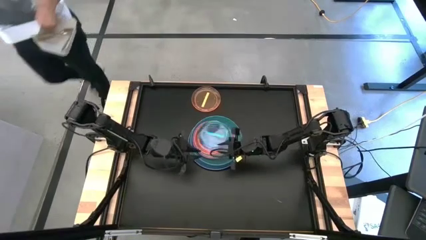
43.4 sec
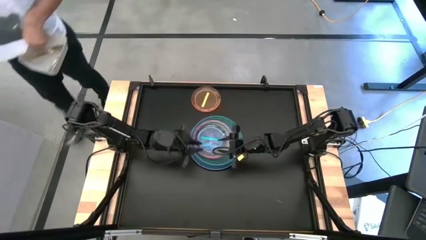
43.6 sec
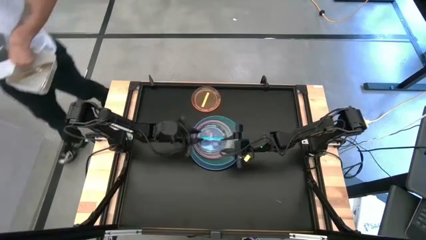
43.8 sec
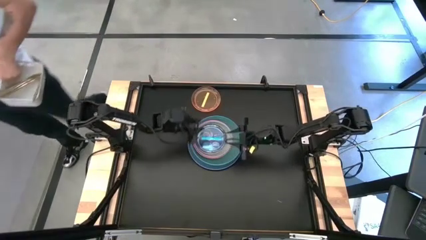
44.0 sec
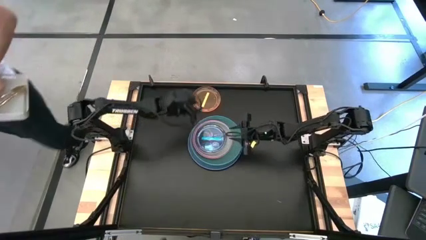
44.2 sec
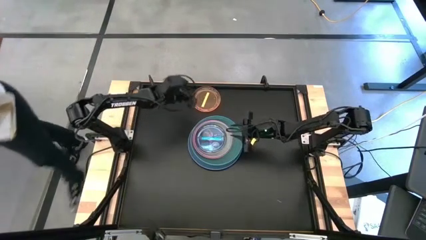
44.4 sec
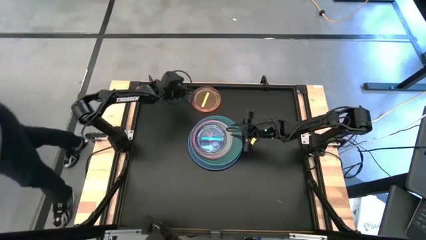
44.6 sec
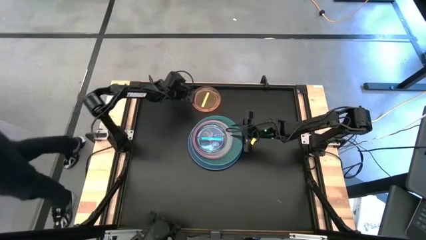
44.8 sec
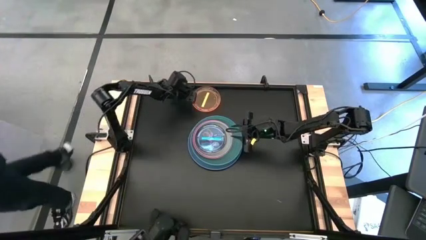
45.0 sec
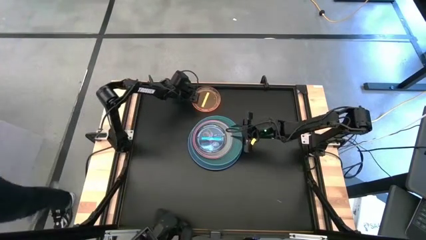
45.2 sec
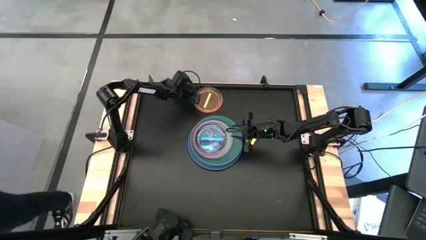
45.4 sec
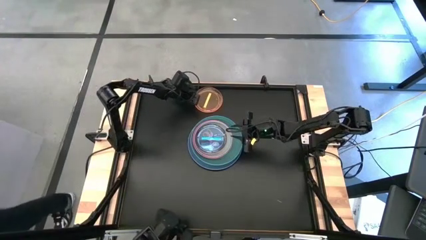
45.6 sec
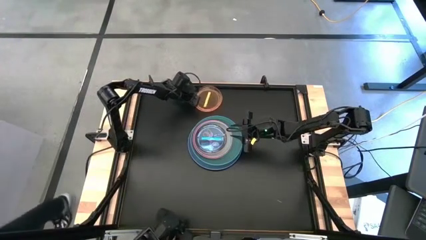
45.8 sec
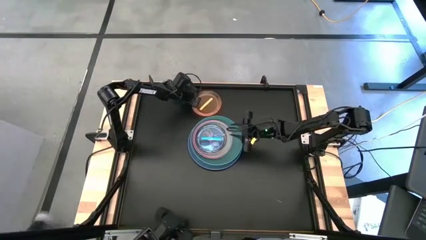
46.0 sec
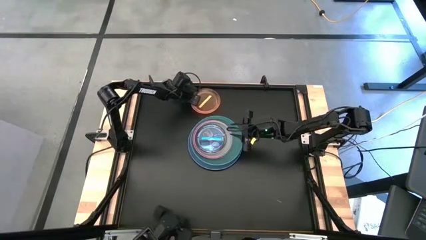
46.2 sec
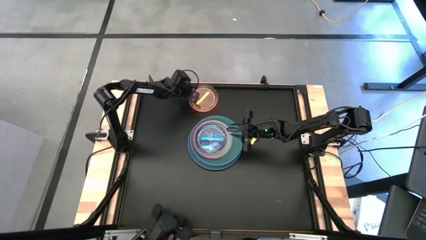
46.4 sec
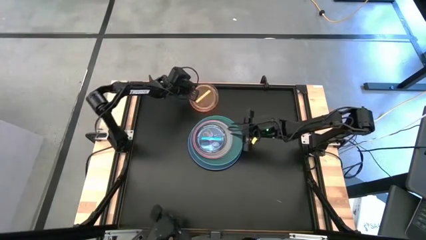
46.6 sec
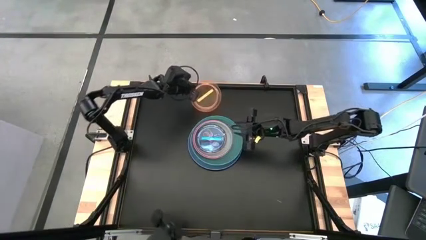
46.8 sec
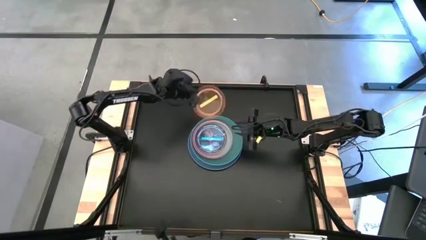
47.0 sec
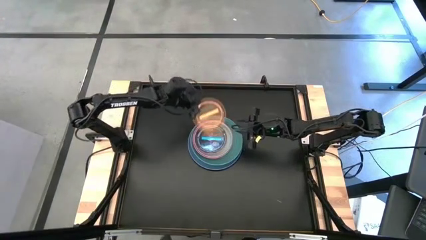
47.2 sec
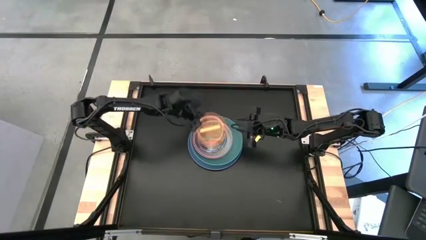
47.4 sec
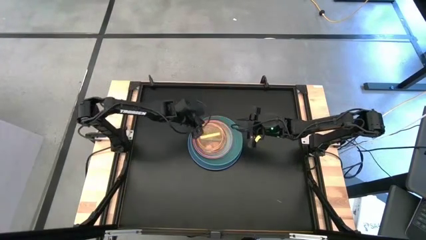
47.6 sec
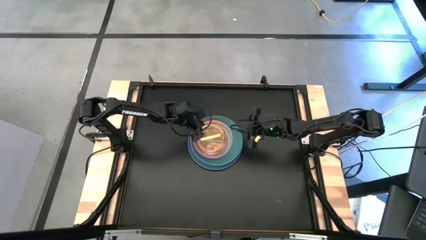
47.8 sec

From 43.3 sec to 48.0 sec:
Task: Stack plastic plates
Stack the orange transparent plate on top of the blue transparent plate

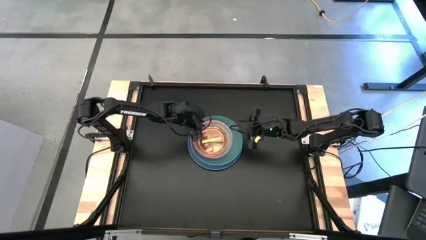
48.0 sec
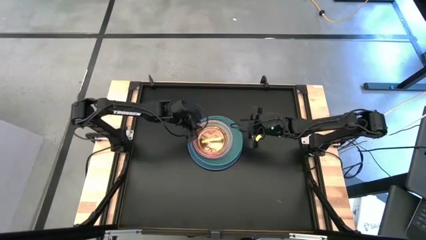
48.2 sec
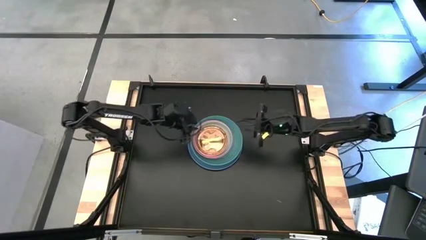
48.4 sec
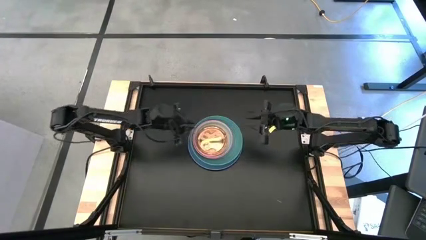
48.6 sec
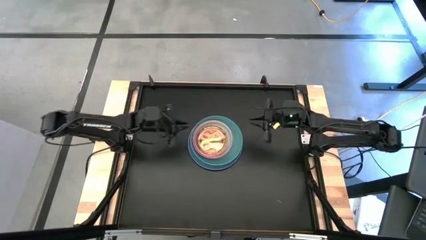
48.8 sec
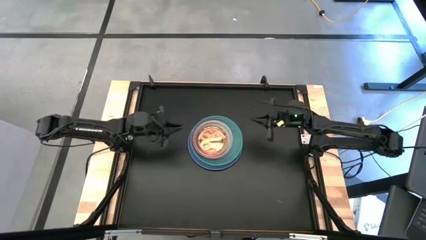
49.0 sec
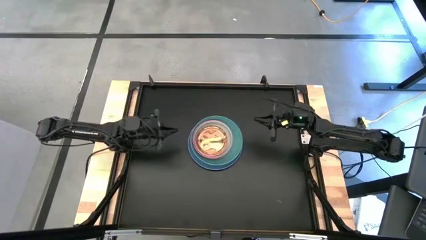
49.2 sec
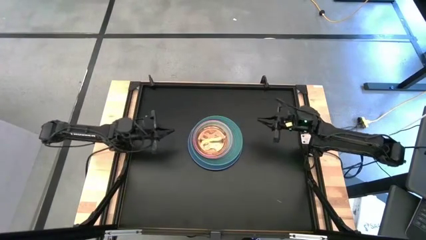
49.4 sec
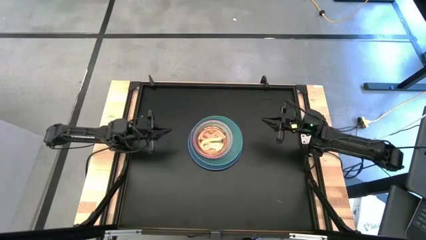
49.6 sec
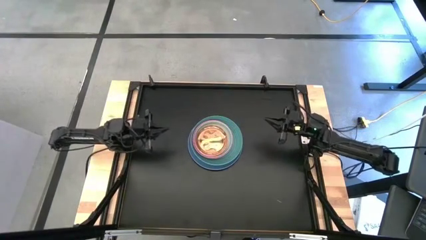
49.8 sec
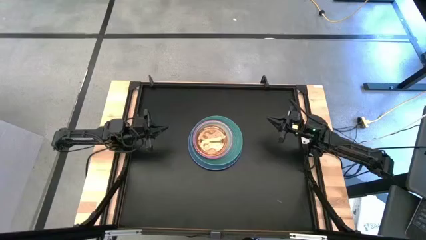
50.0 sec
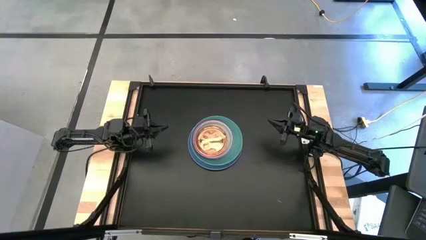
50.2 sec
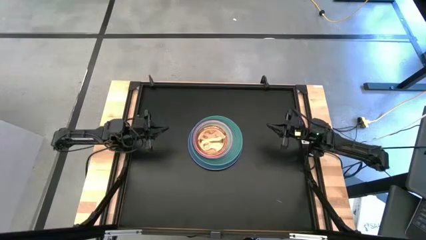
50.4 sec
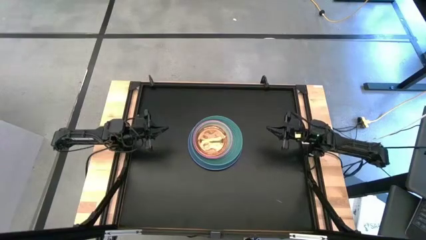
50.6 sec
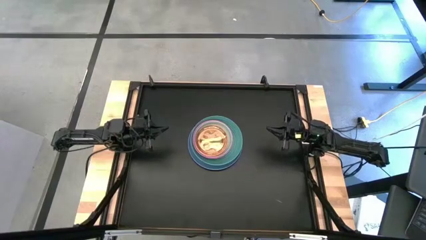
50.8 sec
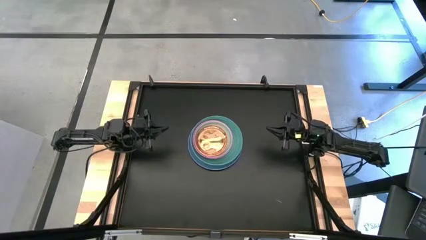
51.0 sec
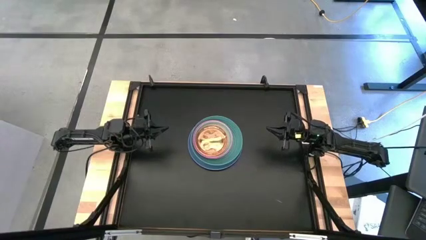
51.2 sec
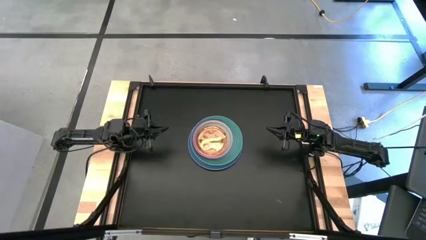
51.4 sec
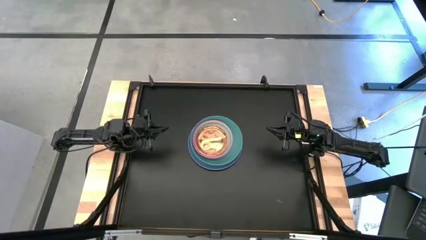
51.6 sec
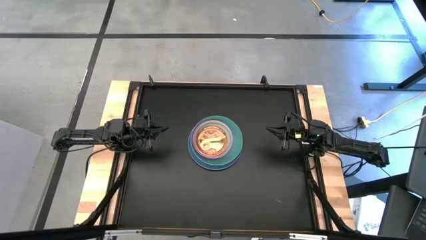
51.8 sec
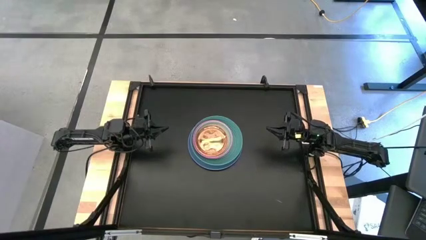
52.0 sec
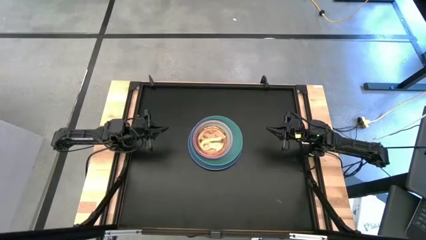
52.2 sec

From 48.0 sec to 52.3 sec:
Return to Home Position

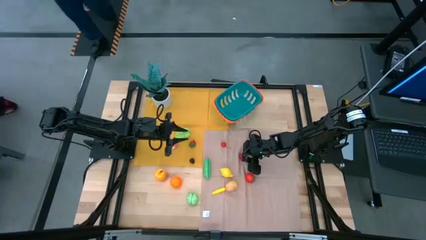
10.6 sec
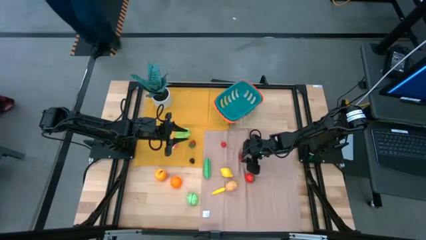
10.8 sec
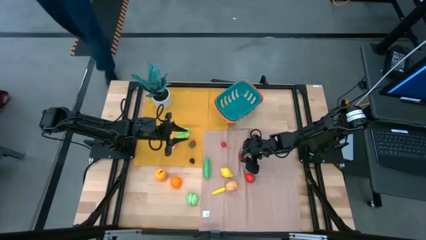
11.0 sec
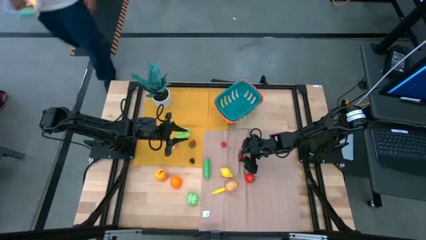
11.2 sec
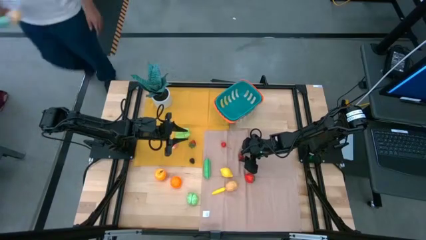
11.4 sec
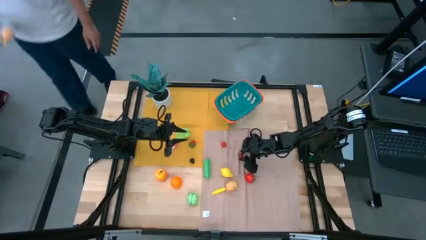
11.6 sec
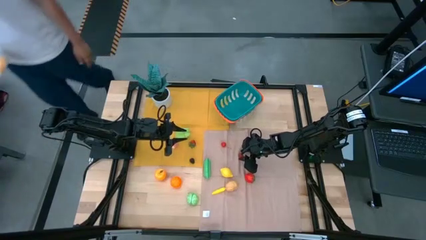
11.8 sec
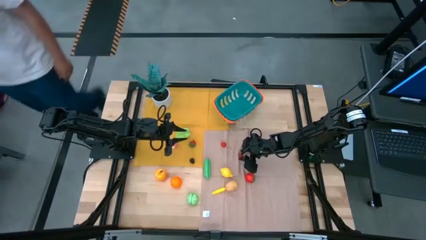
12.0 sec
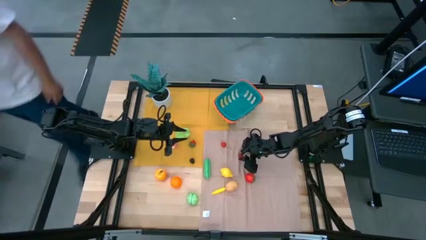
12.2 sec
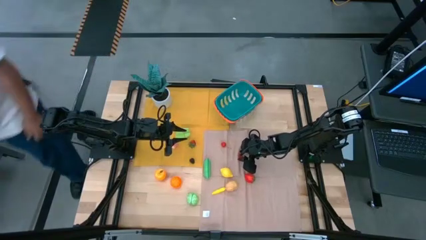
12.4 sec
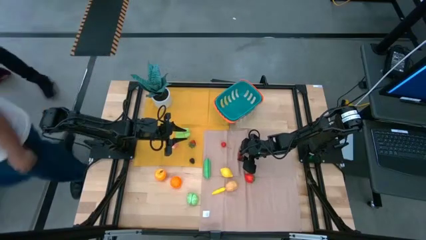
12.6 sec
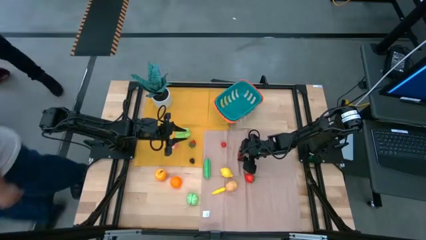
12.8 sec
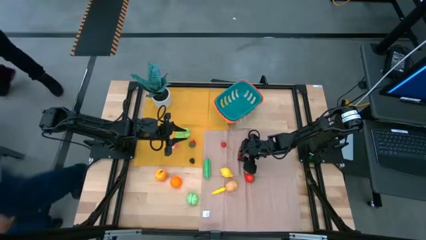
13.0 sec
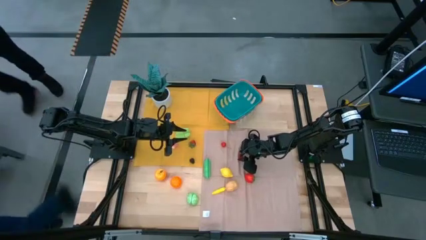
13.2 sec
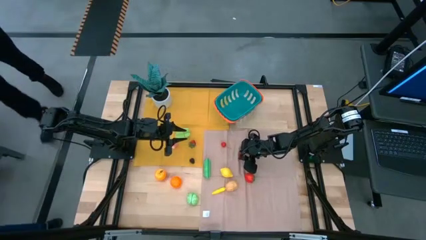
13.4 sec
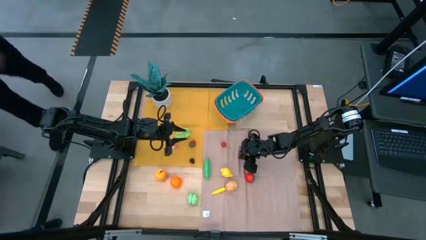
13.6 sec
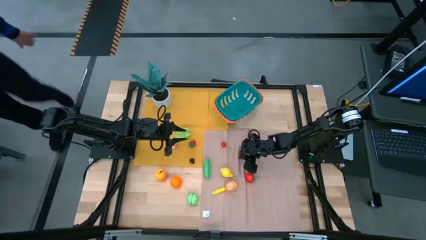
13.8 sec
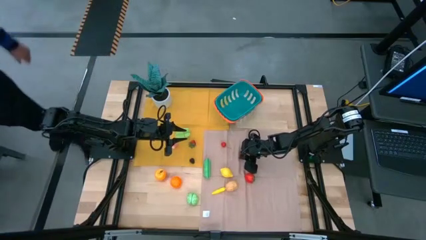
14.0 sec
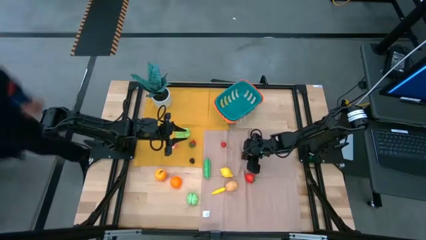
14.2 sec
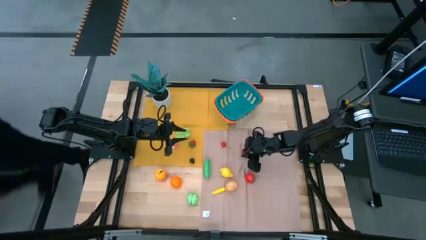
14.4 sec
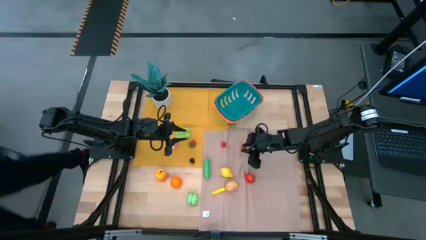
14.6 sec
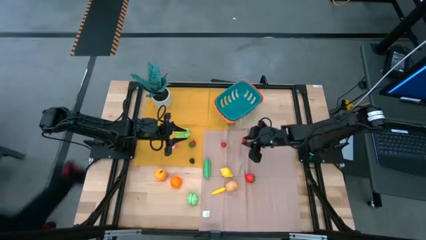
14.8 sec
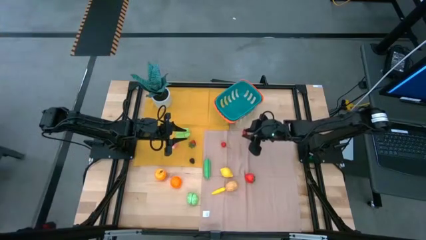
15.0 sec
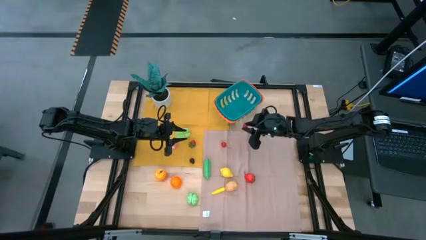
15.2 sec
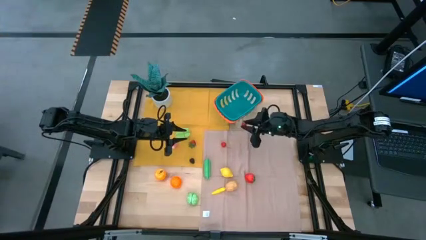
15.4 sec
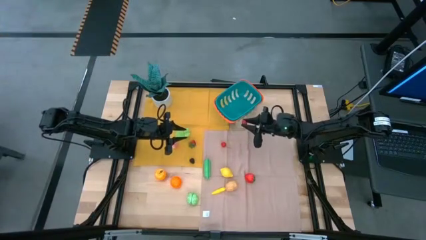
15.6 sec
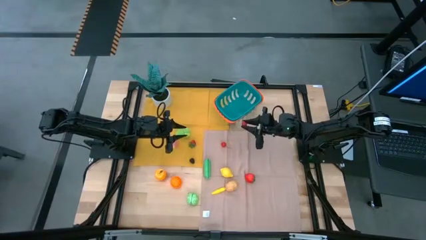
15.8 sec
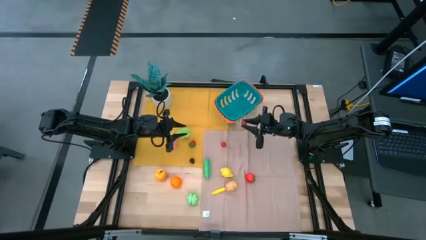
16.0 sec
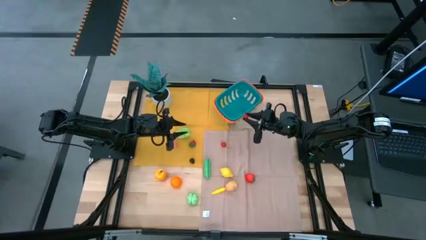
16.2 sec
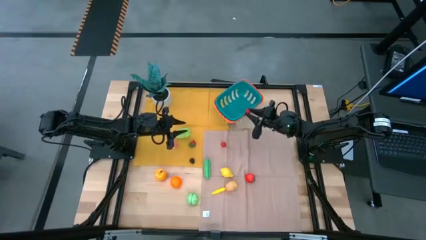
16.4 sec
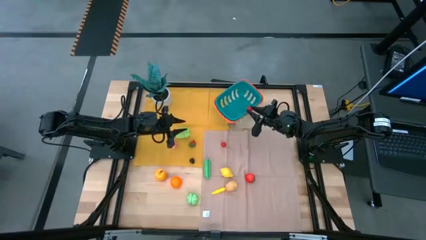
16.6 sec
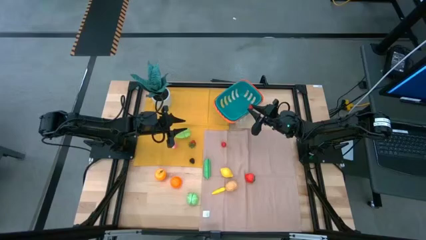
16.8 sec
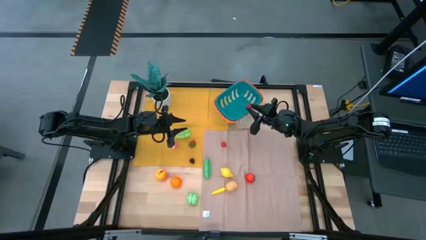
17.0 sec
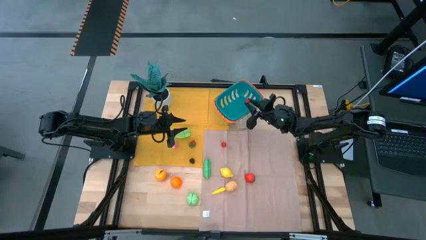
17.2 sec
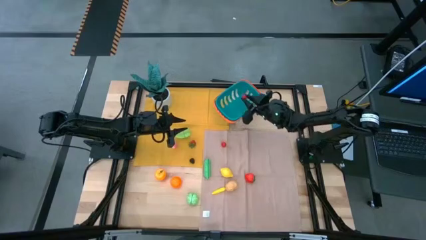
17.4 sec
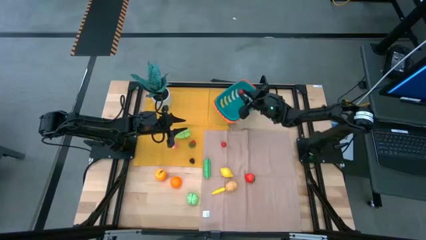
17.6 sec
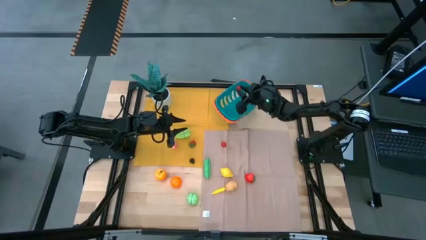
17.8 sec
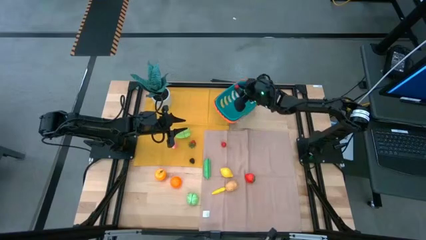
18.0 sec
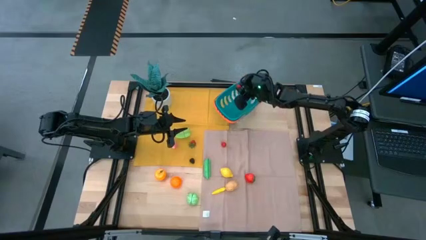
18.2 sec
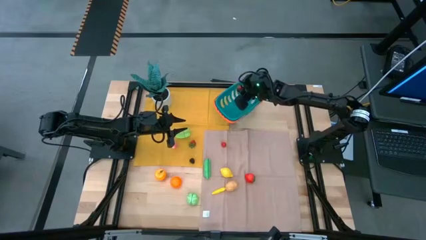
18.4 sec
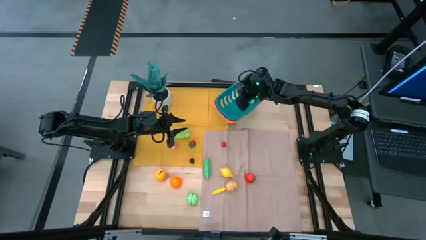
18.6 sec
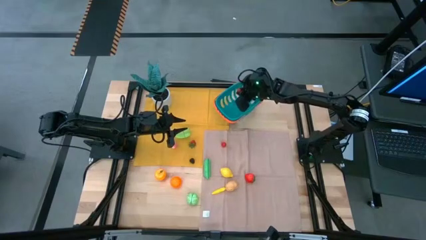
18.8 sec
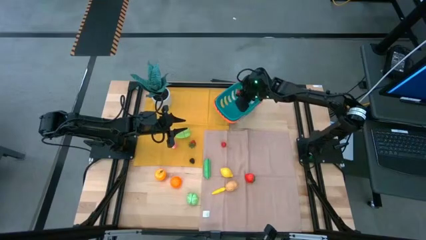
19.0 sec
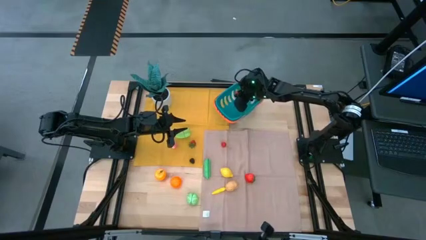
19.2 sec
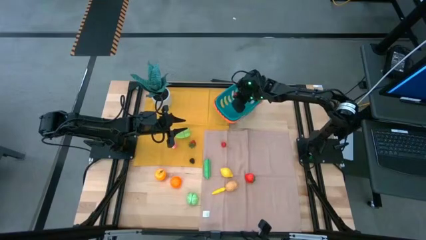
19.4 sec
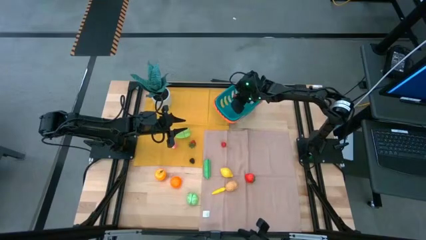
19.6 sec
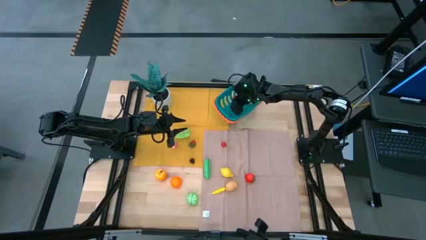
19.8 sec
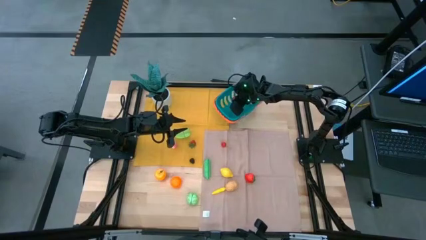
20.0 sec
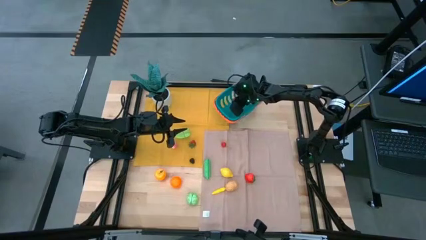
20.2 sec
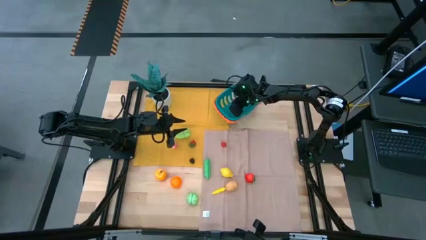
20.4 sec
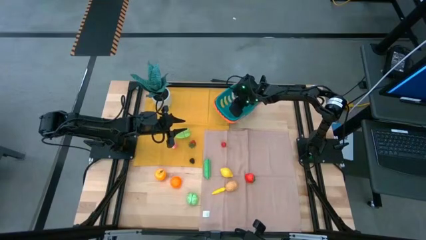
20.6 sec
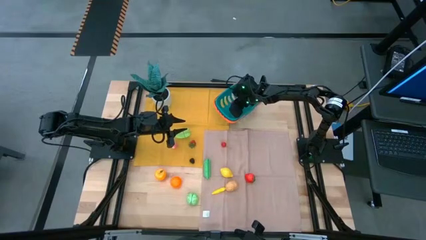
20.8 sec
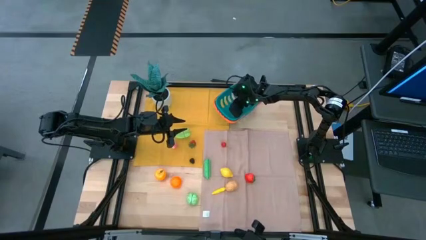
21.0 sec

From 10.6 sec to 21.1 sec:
Task: Pick and placing Produce into tupperware
Put the top right strawberry into the basket
